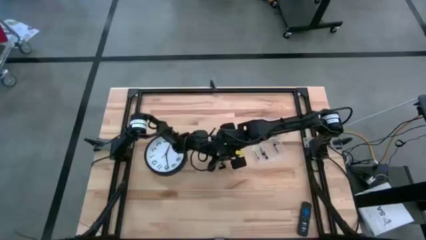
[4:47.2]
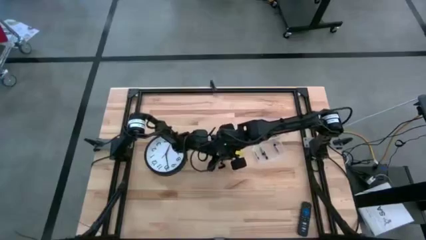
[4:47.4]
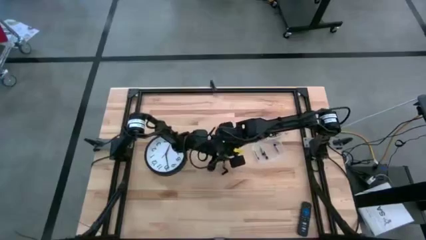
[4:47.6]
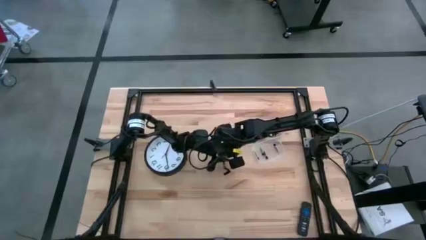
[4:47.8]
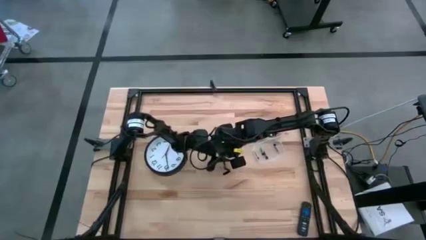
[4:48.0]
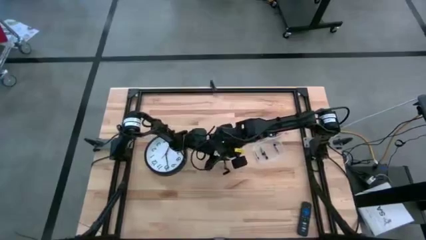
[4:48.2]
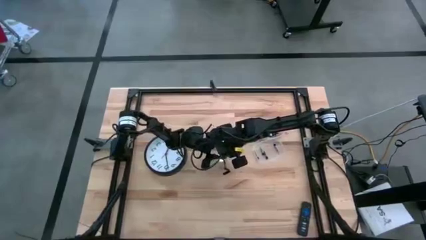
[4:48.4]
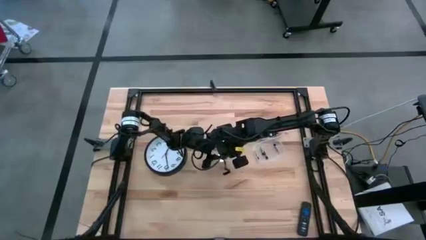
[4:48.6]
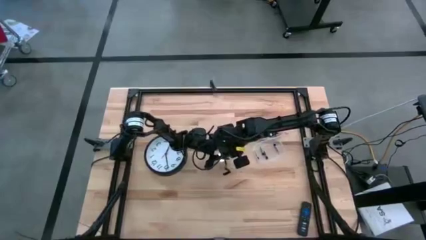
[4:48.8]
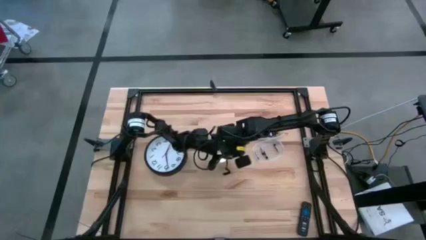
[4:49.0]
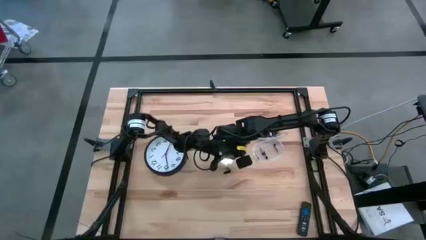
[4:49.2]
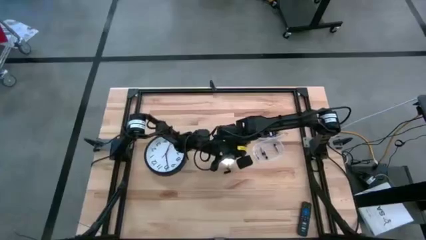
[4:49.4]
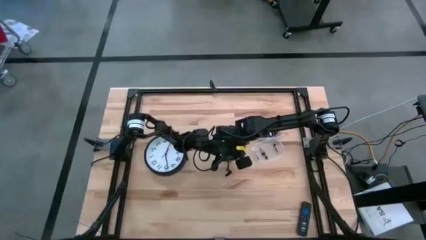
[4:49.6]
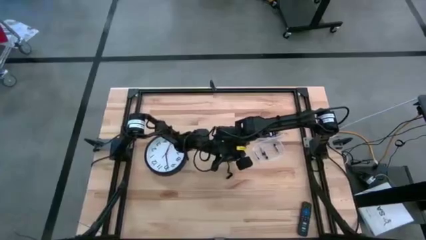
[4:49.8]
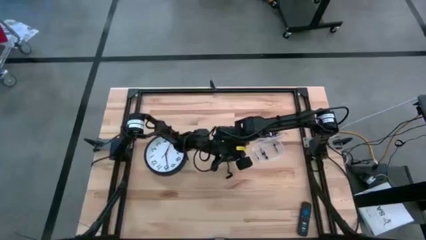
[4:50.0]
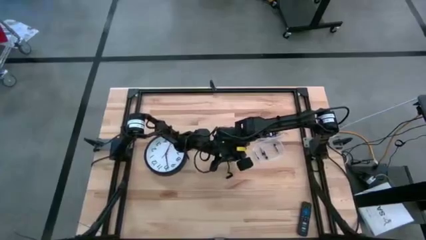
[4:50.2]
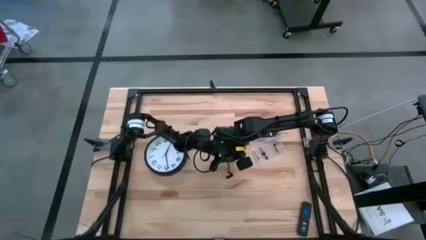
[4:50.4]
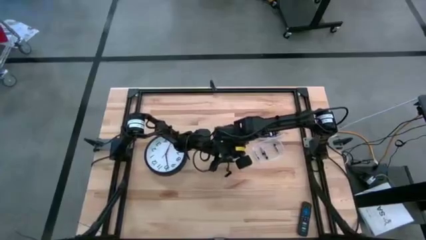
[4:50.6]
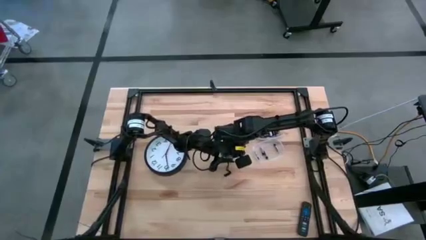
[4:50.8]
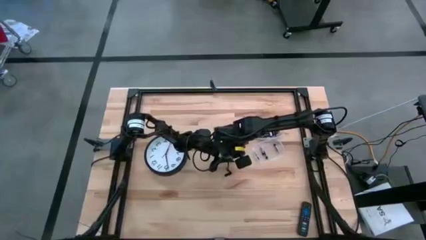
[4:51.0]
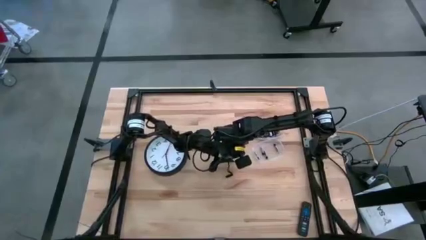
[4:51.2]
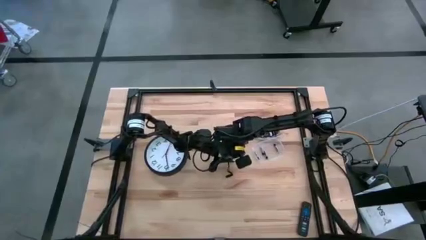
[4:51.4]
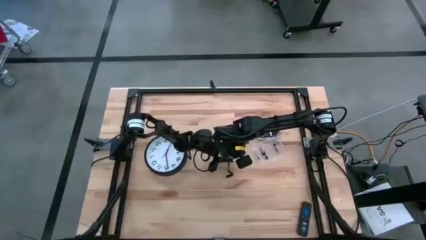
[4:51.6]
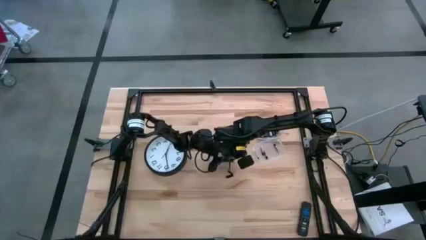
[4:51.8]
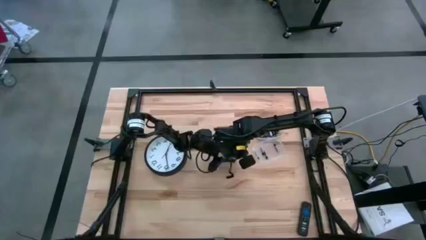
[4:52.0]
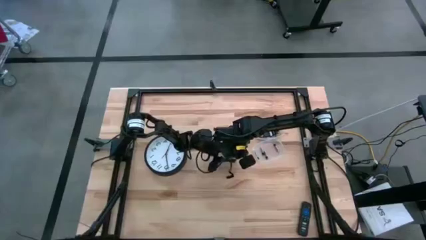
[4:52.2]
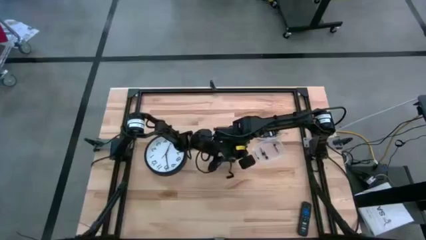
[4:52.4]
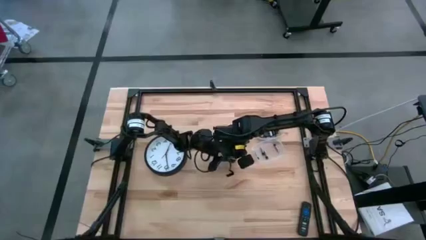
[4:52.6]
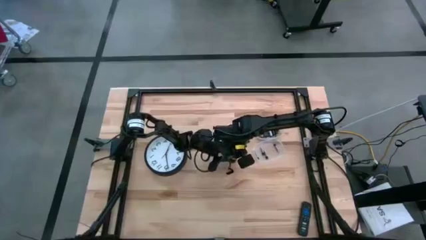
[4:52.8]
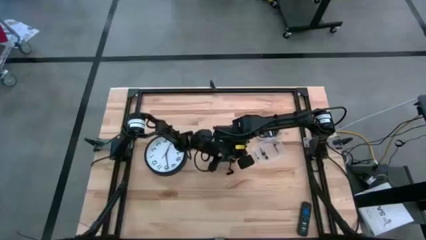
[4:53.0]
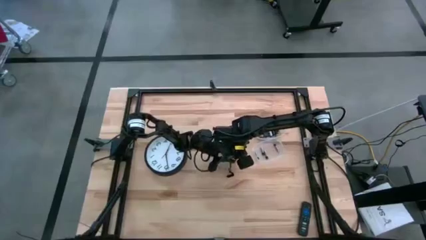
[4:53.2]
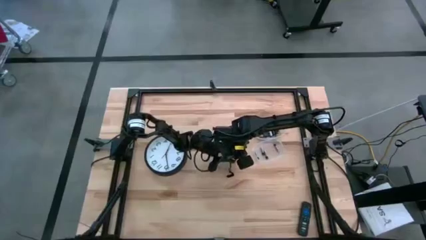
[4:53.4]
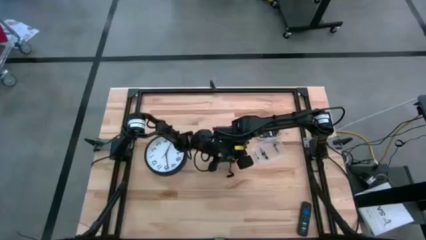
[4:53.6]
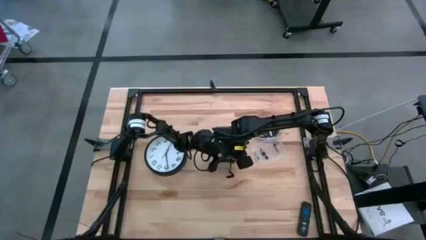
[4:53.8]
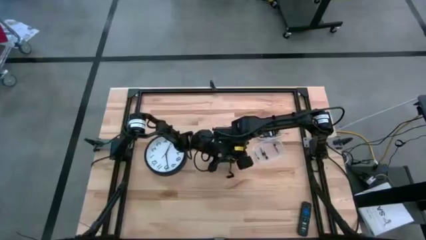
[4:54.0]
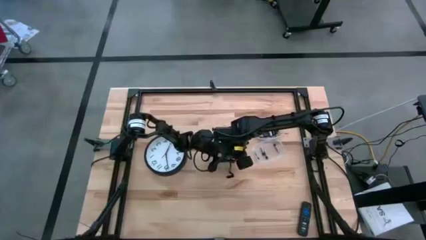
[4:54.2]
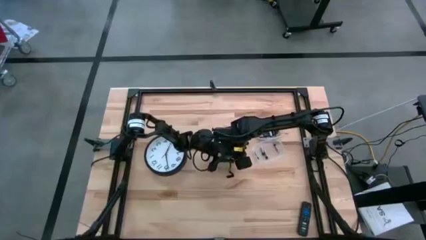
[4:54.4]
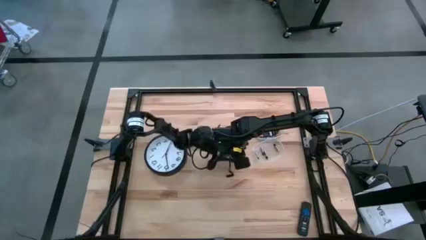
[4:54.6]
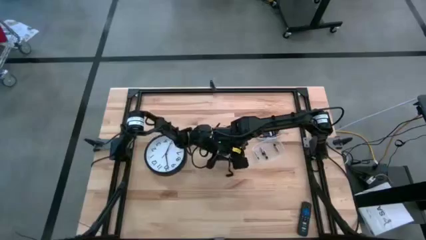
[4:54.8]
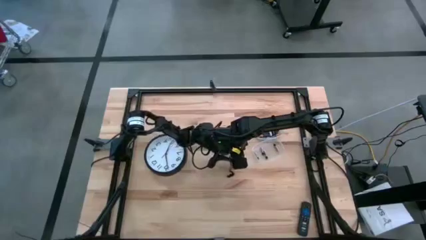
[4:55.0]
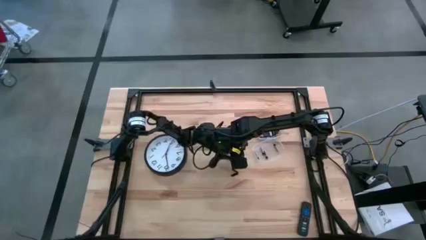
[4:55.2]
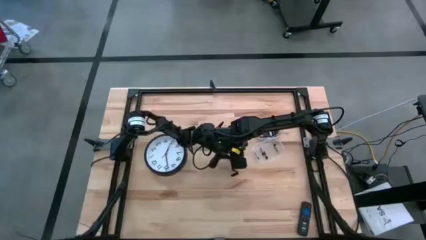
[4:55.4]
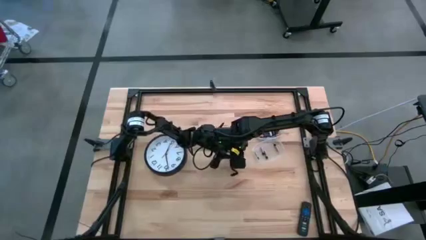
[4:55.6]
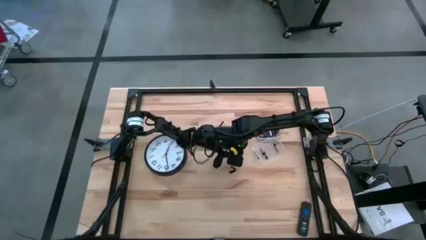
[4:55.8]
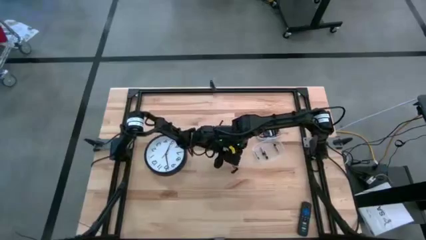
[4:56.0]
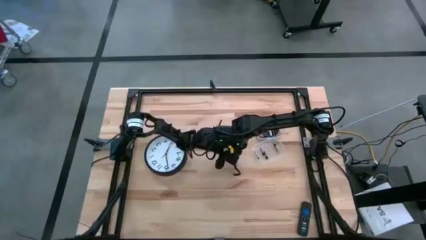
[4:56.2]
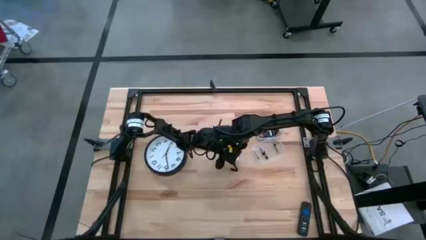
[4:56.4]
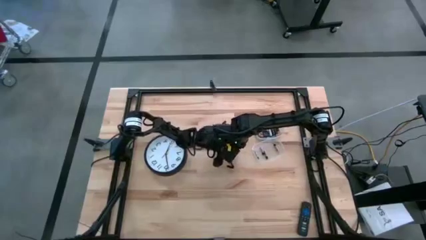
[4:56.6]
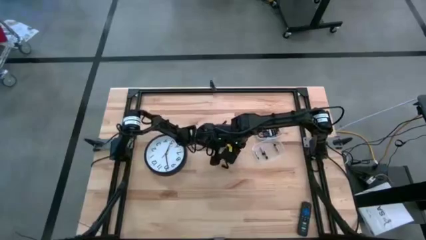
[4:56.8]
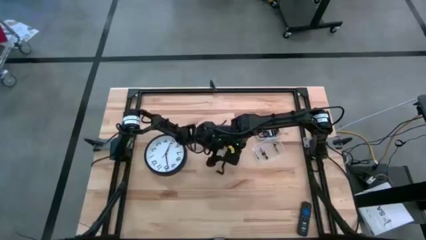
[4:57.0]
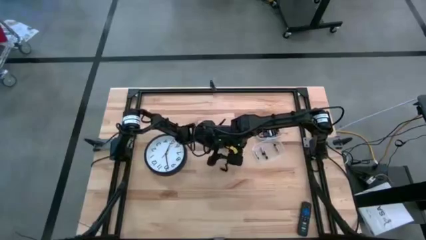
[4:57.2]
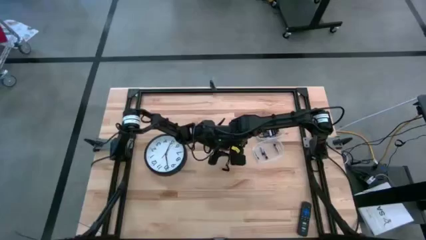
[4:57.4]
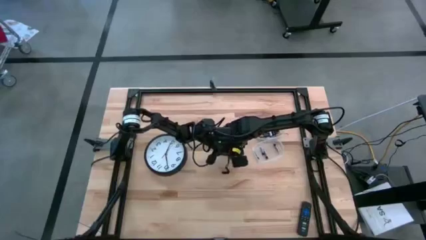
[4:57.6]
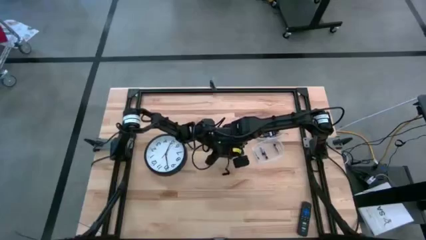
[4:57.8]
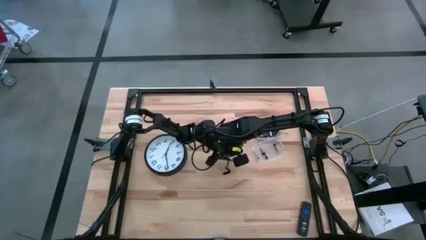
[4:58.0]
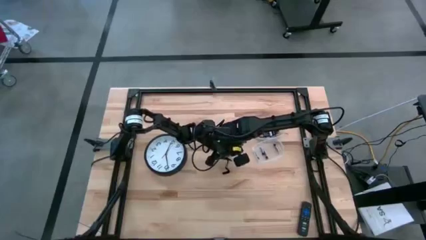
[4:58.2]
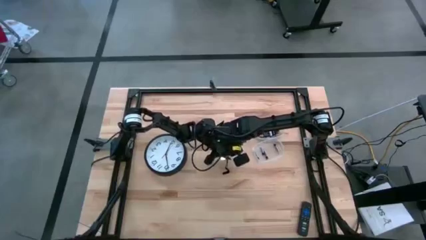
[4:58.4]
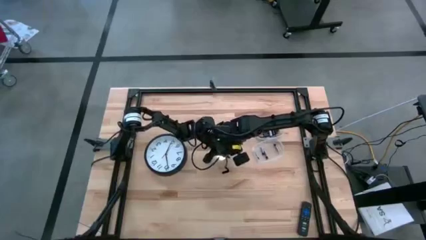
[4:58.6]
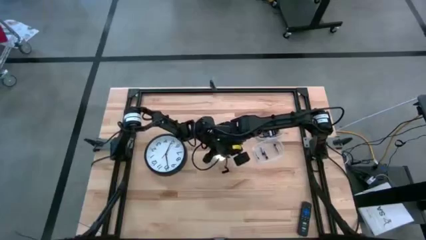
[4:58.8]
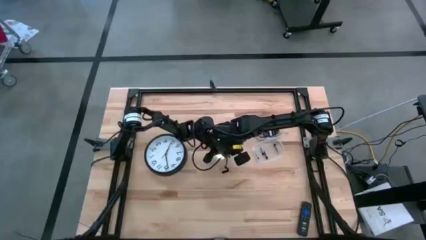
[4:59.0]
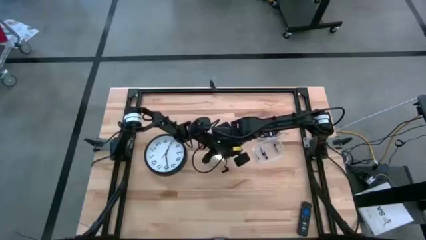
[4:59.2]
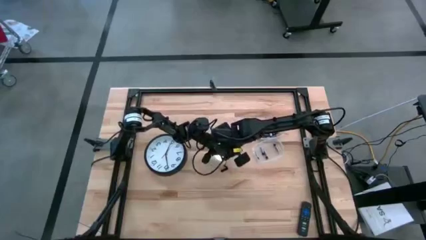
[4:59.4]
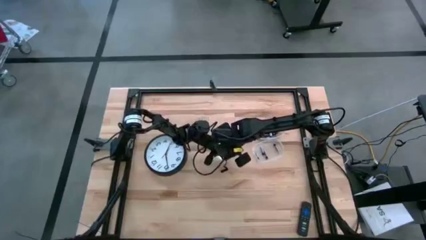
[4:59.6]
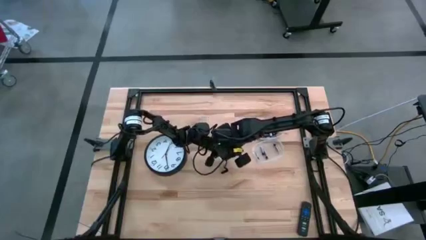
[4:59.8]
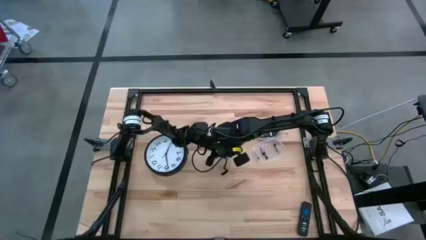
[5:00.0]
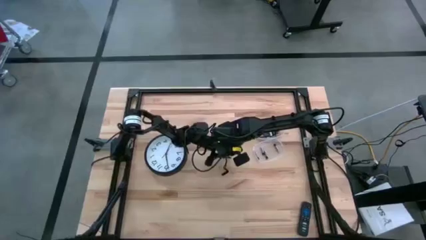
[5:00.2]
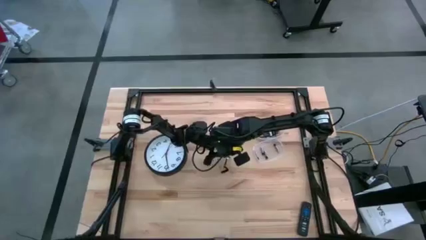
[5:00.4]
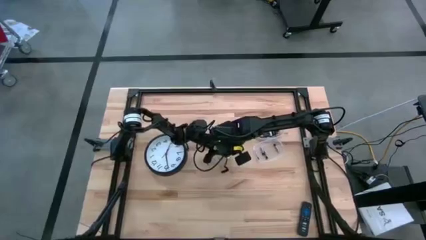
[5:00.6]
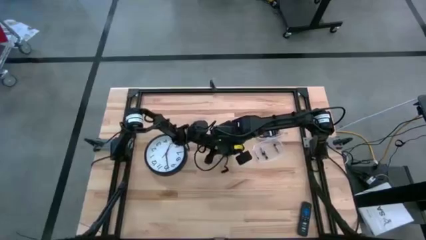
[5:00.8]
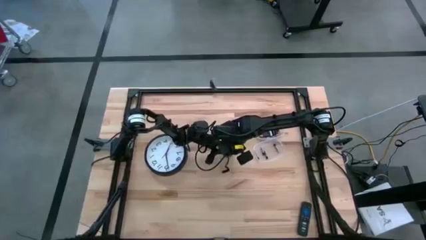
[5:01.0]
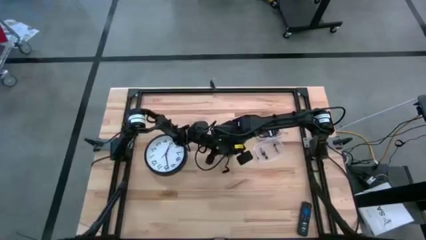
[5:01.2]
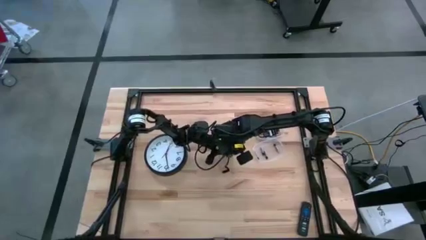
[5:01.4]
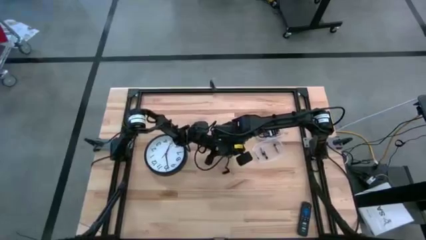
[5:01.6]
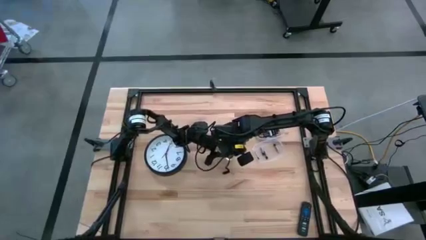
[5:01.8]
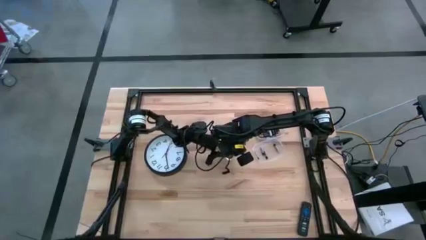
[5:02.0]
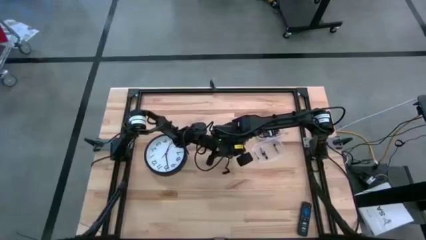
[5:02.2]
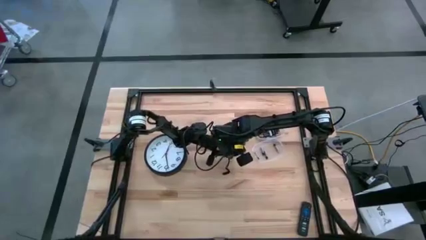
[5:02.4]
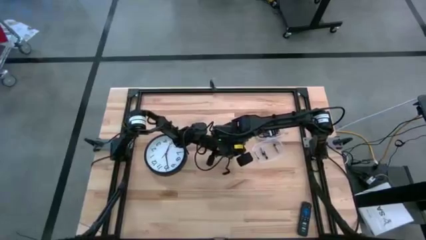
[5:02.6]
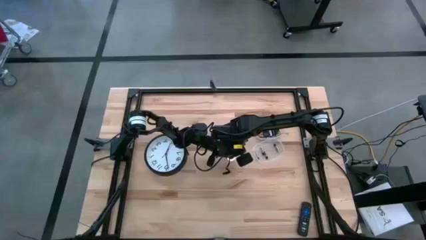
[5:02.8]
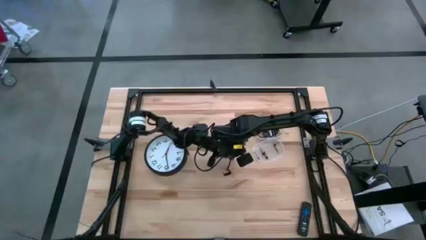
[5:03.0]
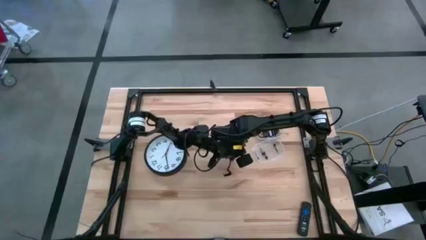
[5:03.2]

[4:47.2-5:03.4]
Task: Insert battery
Close the black battery compartment
